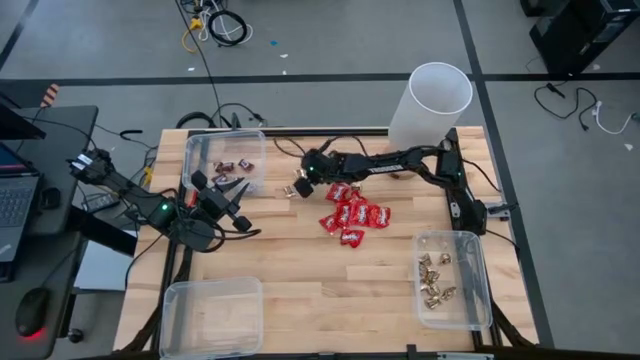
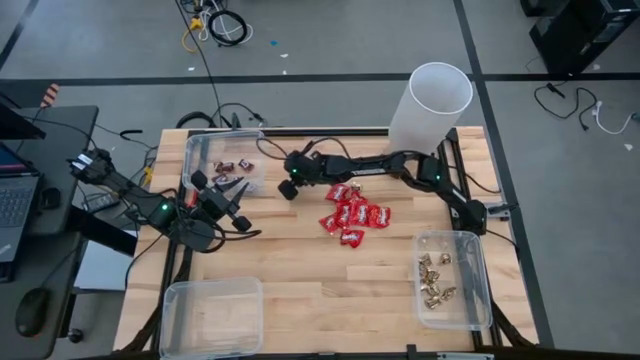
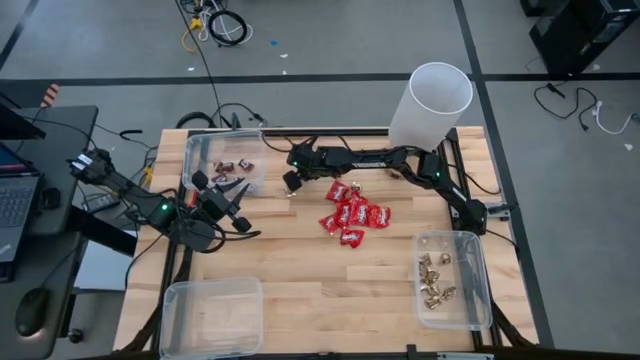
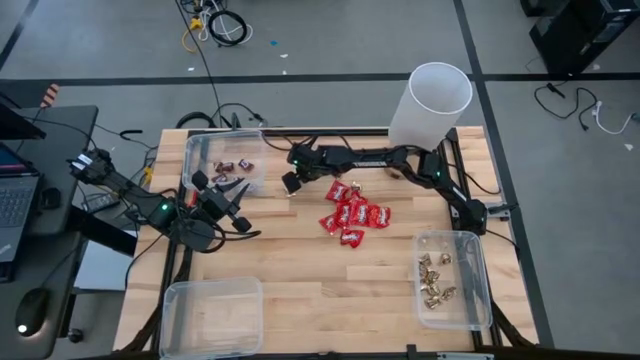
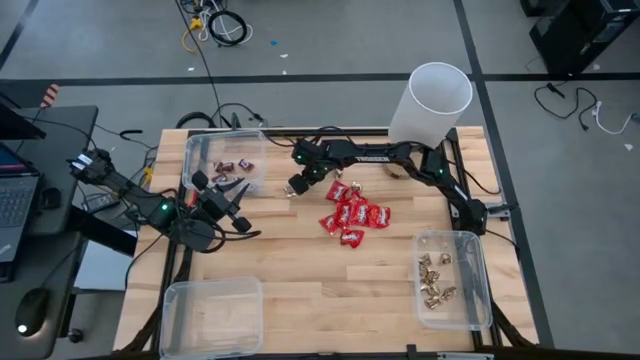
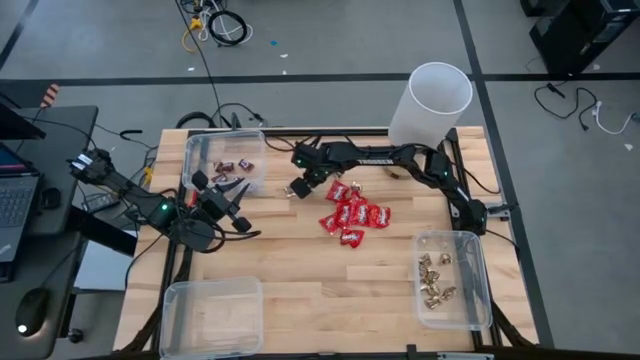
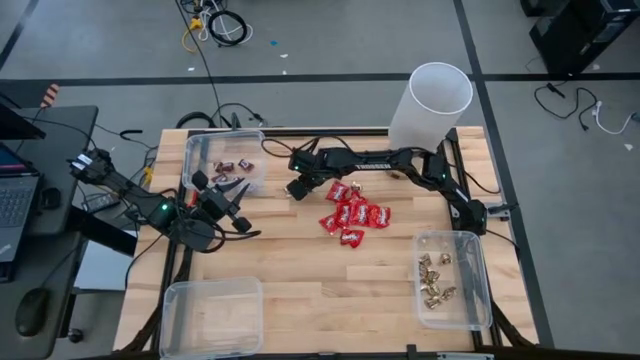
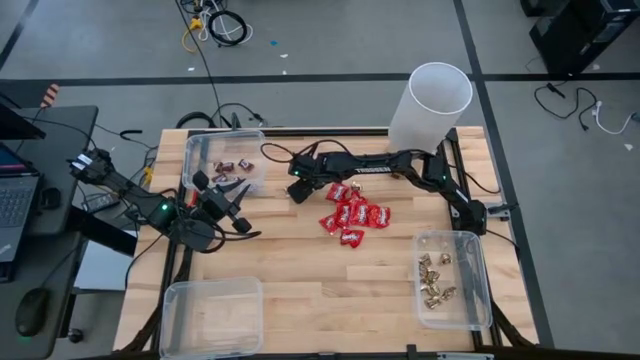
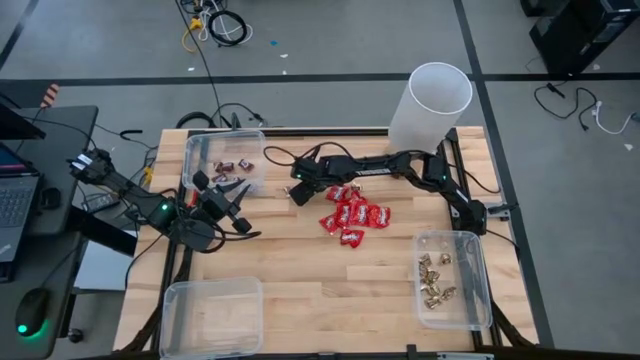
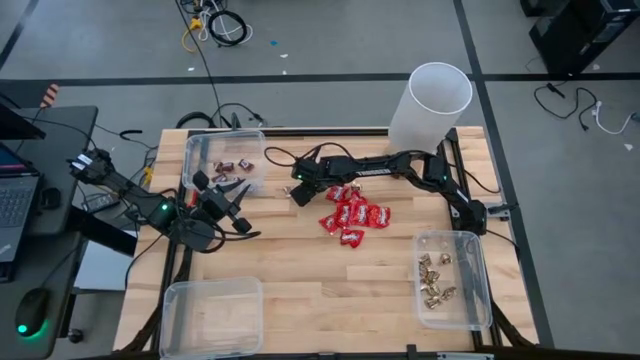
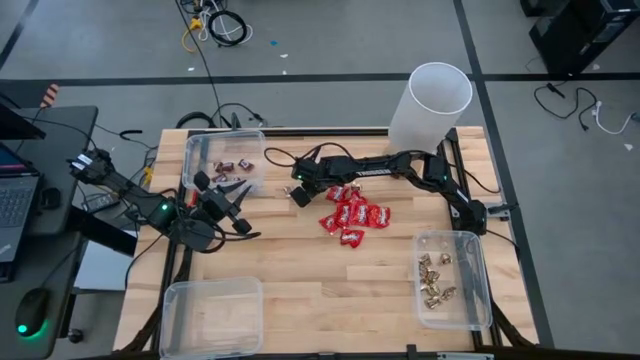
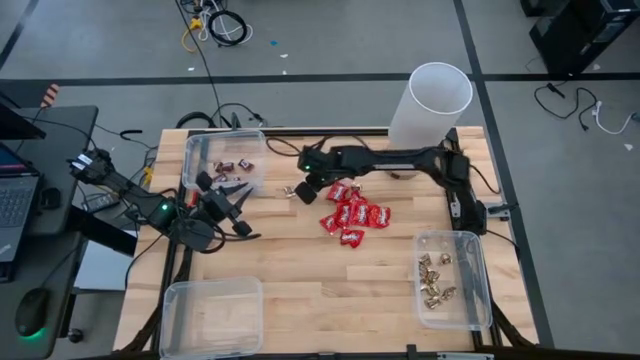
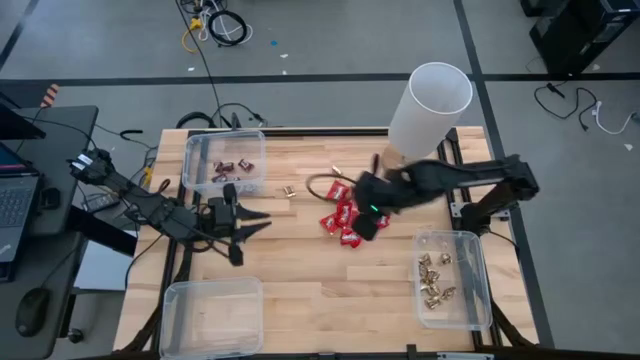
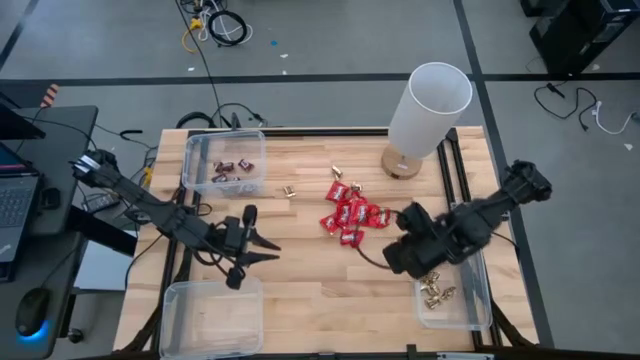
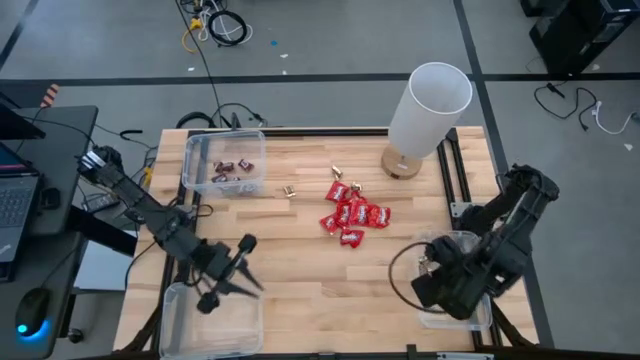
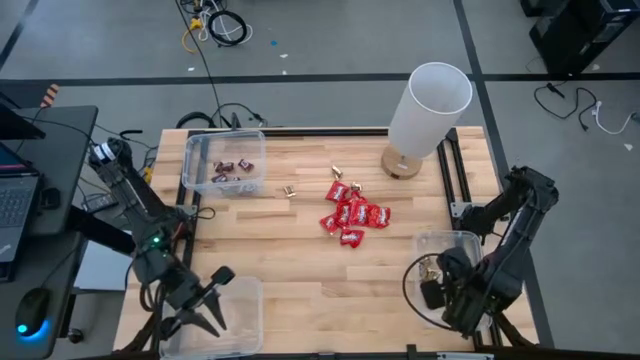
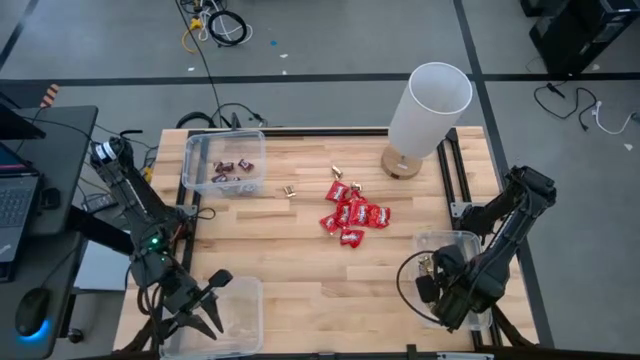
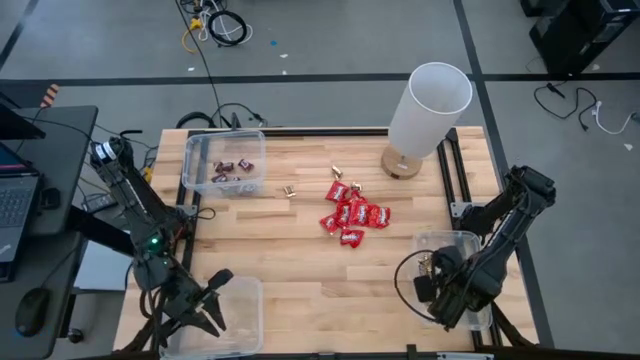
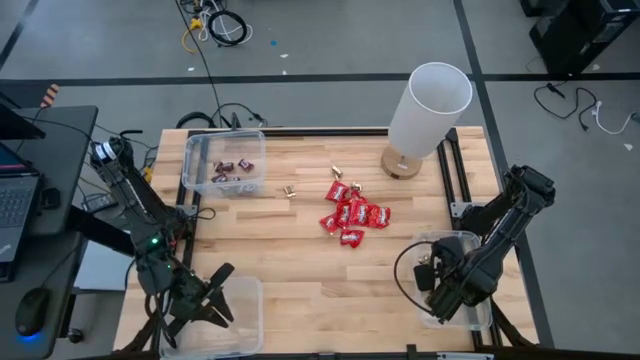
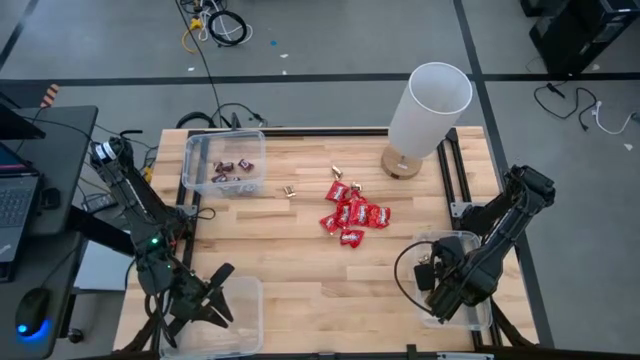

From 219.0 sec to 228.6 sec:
Task: Sort candy
Put the gold chocolate into the bottom right transparent bin

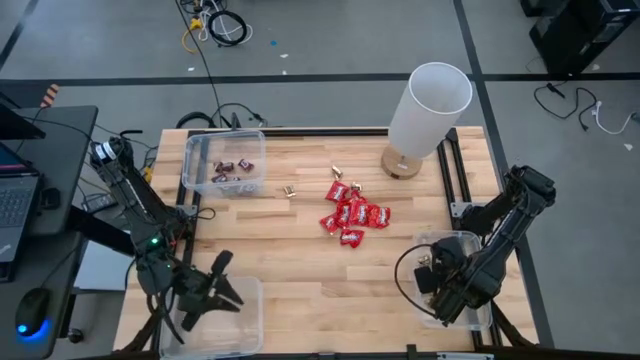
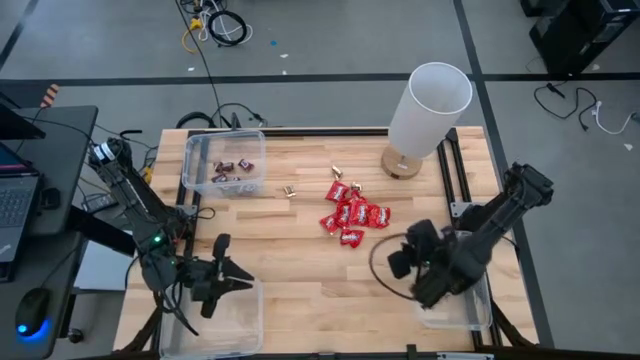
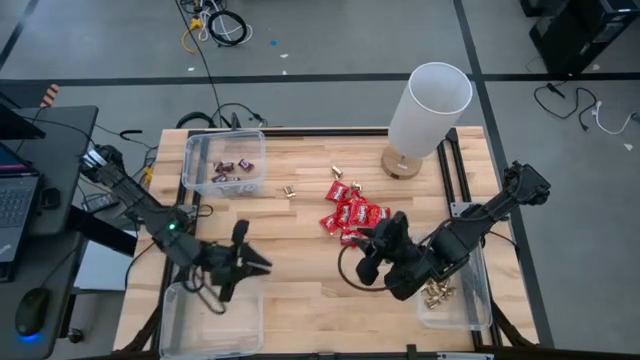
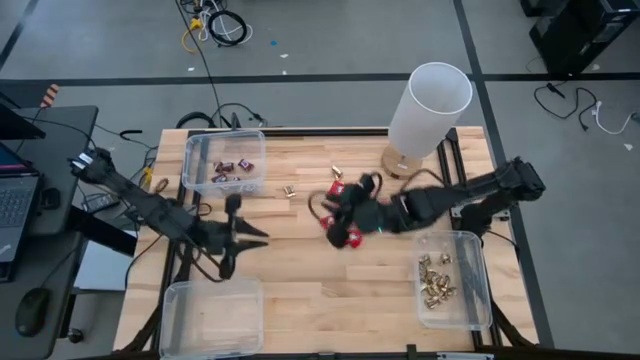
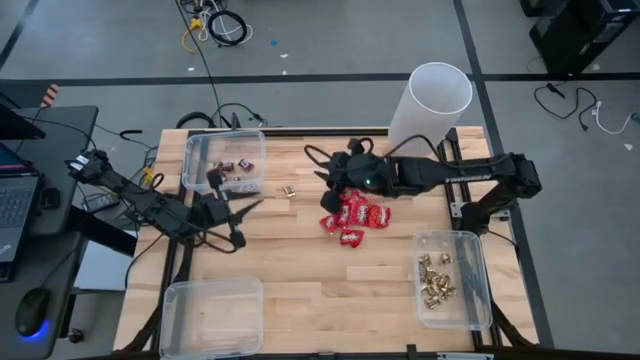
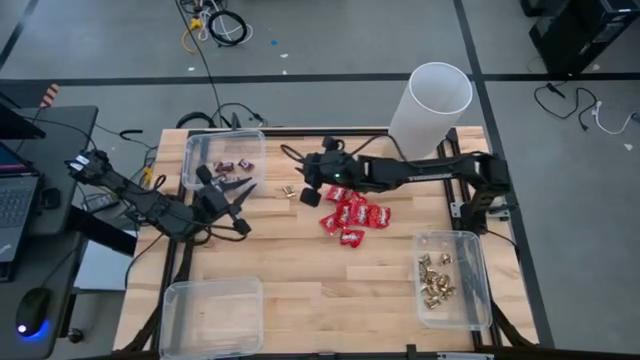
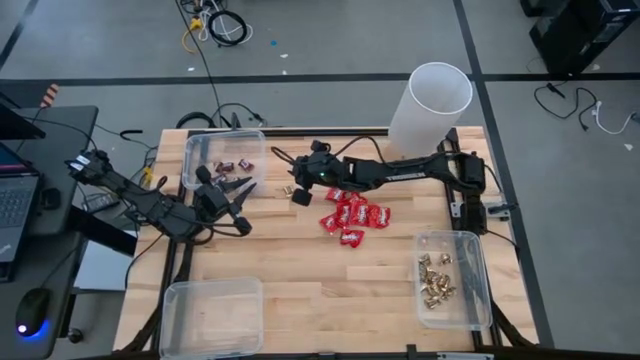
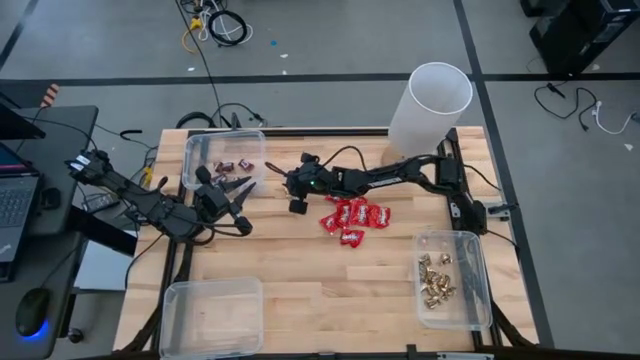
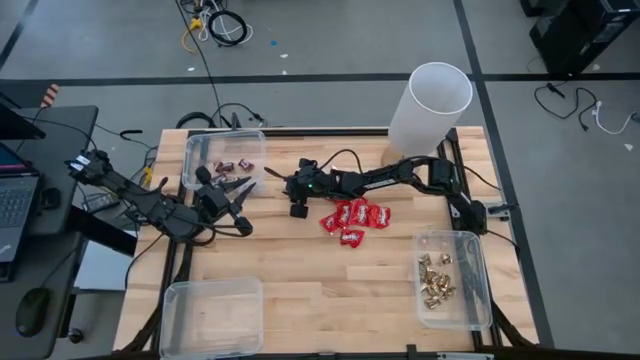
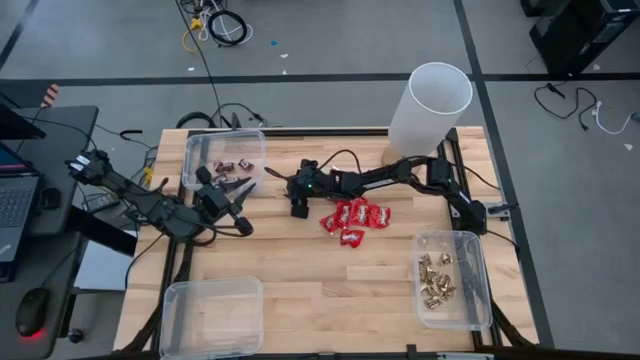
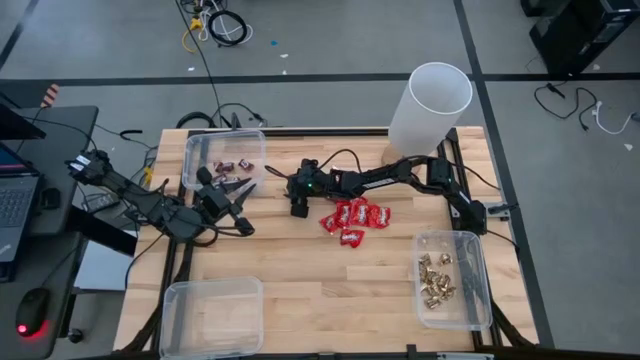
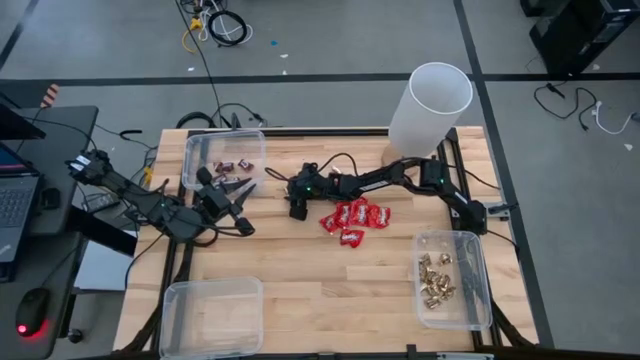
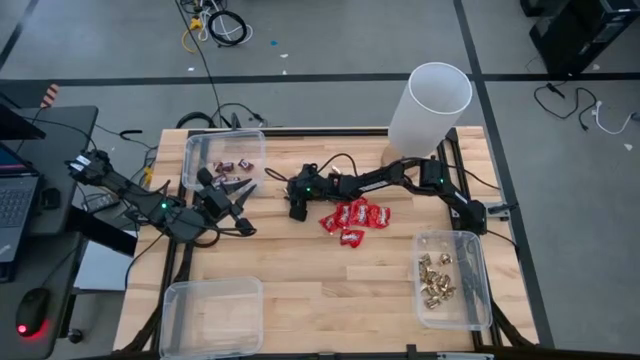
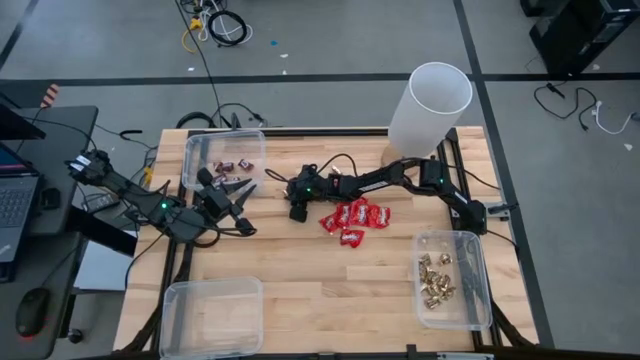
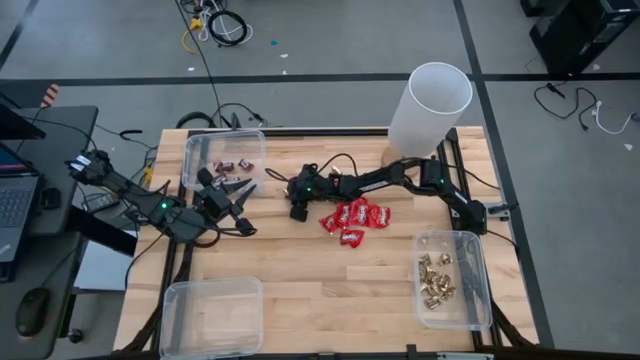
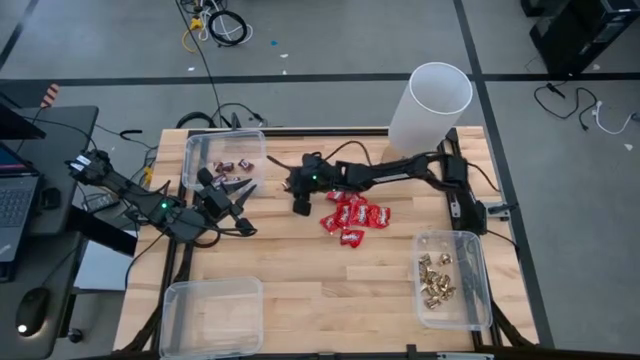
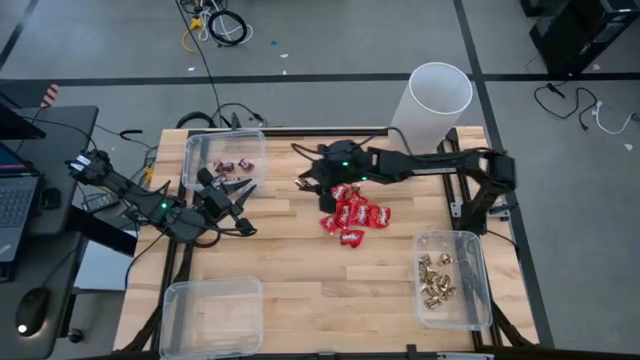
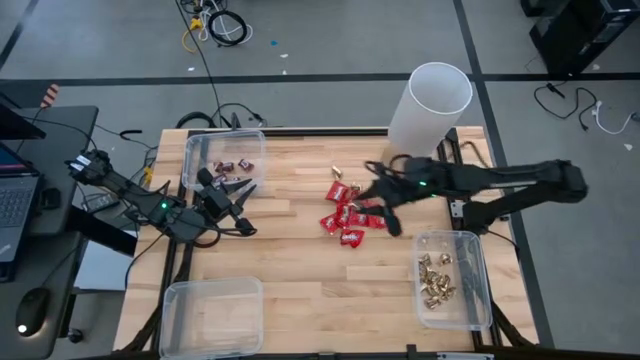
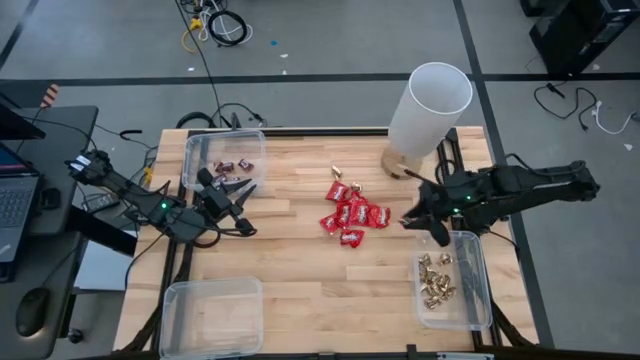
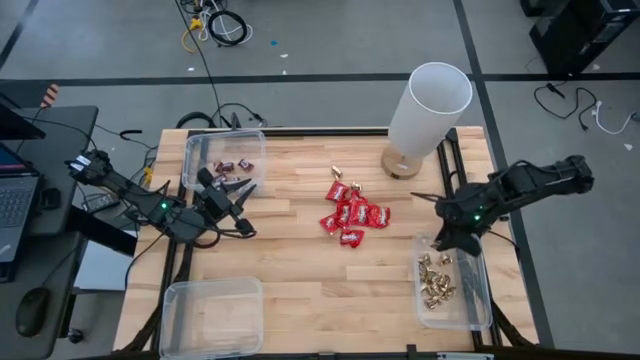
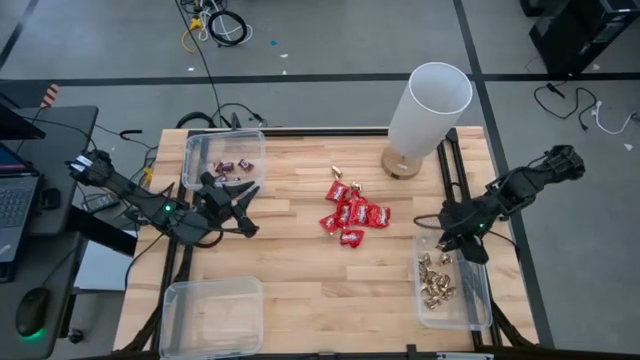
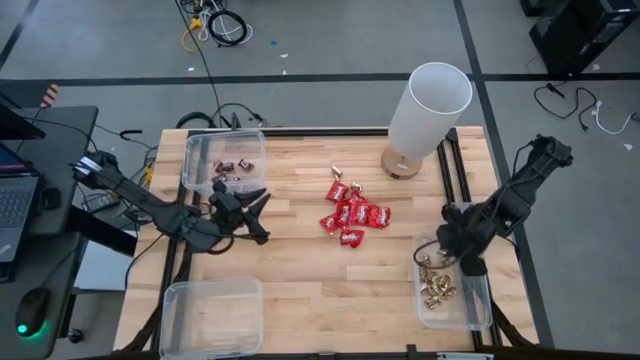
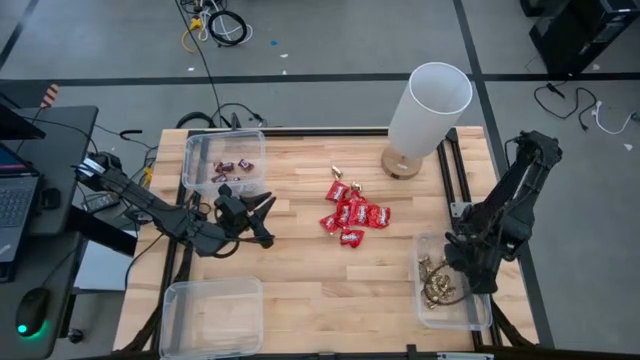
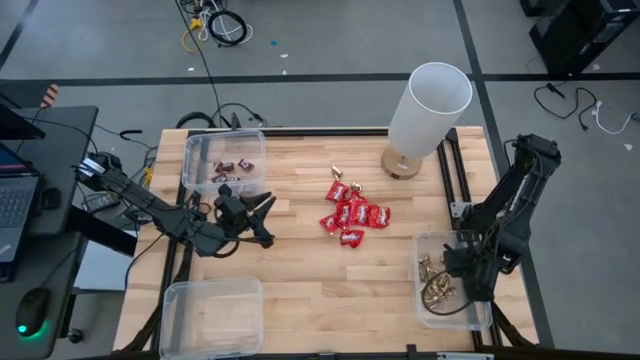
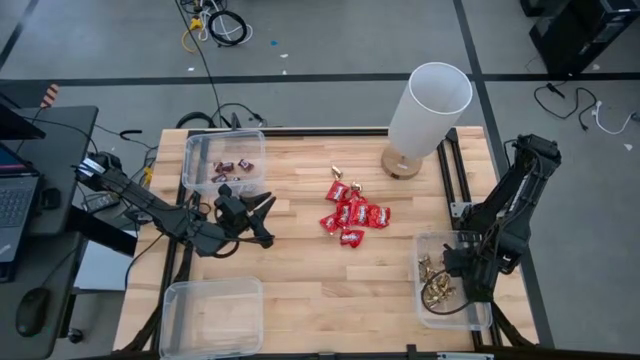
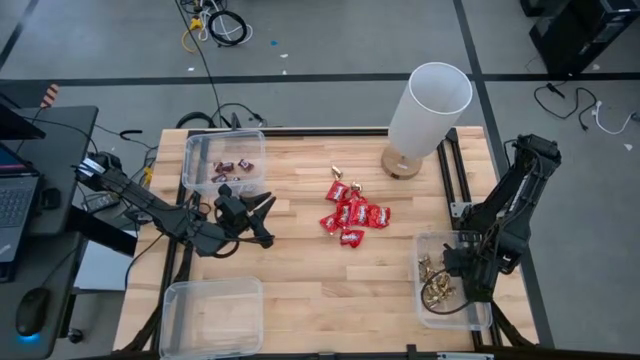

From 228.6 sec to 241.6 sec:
Put the gold chocolate into the bottom right transparent bin
